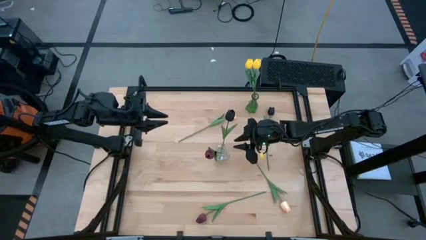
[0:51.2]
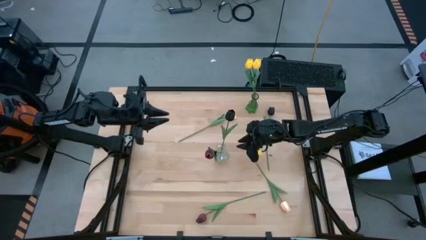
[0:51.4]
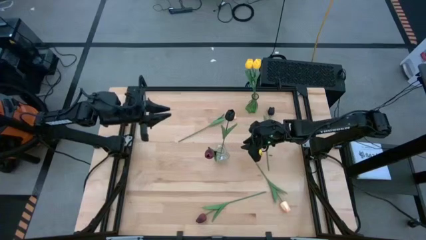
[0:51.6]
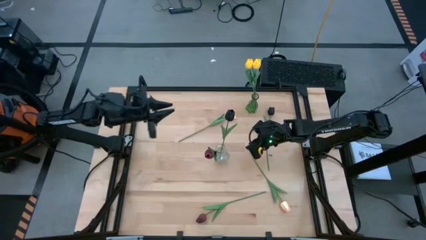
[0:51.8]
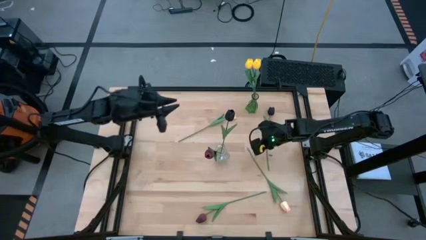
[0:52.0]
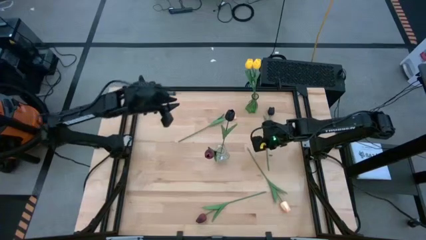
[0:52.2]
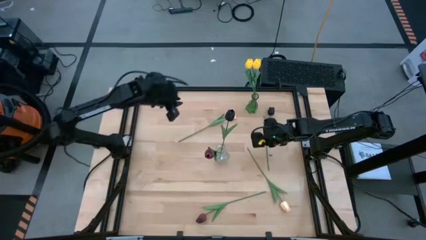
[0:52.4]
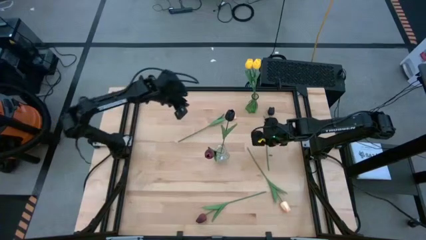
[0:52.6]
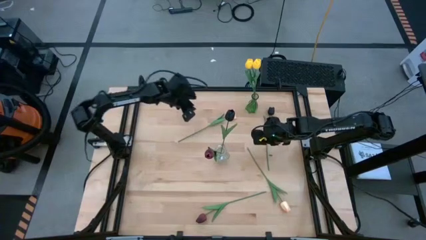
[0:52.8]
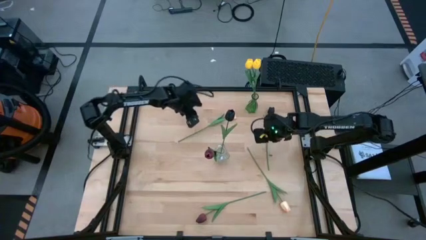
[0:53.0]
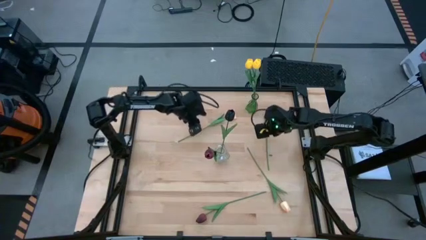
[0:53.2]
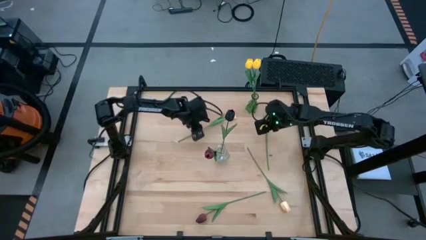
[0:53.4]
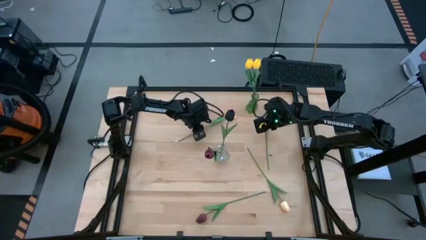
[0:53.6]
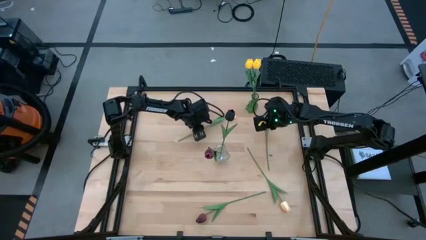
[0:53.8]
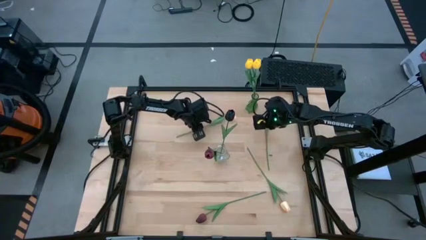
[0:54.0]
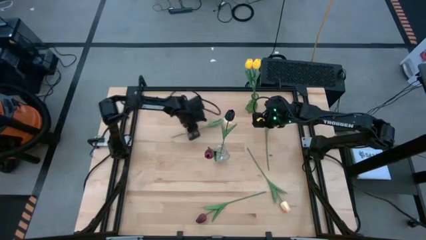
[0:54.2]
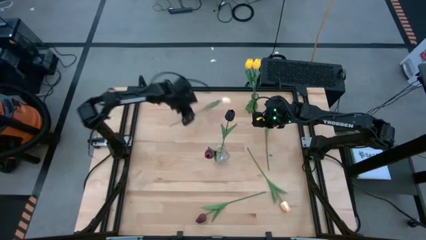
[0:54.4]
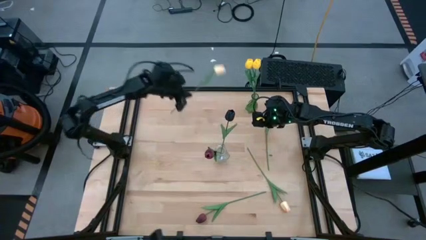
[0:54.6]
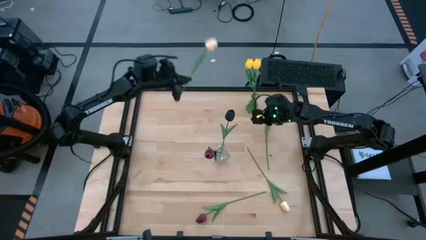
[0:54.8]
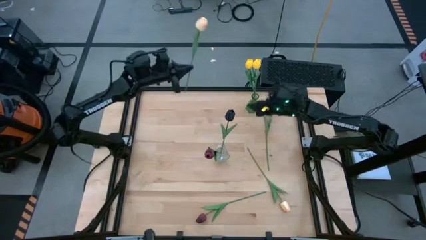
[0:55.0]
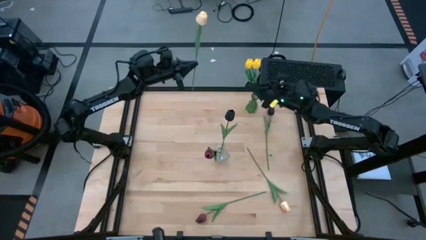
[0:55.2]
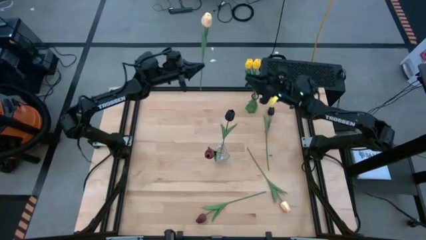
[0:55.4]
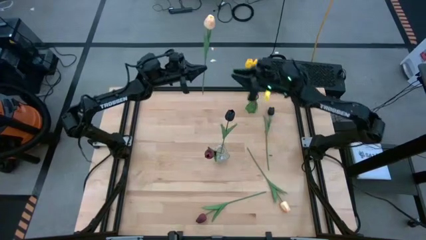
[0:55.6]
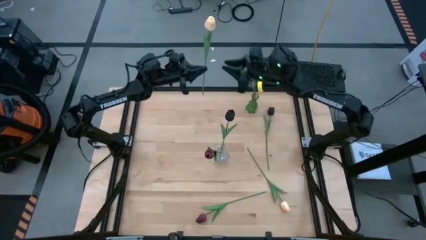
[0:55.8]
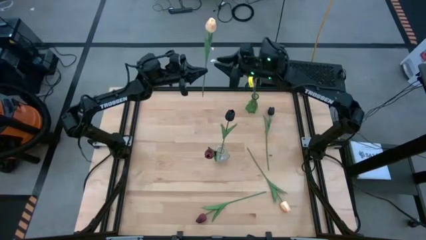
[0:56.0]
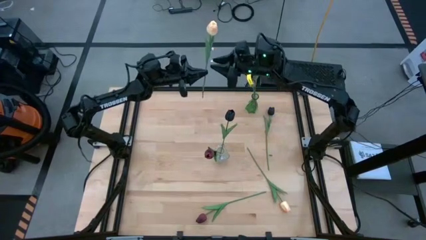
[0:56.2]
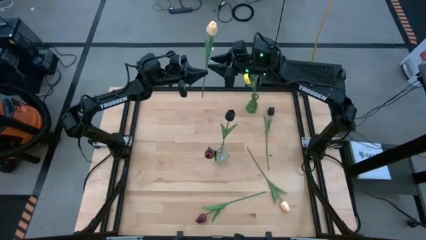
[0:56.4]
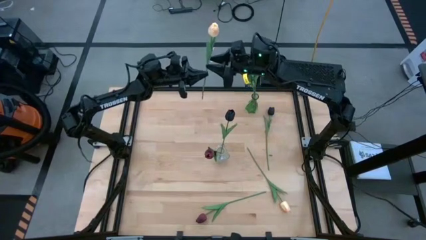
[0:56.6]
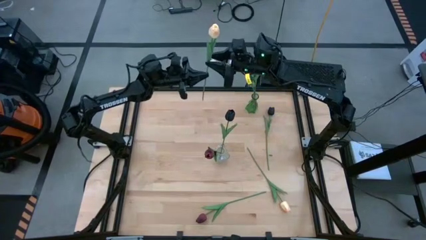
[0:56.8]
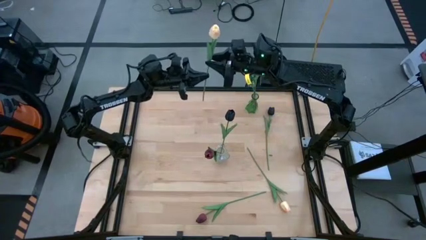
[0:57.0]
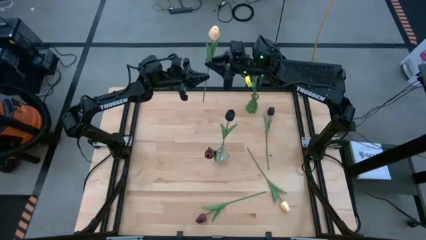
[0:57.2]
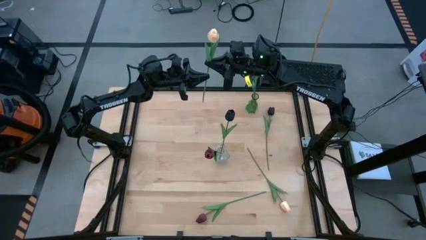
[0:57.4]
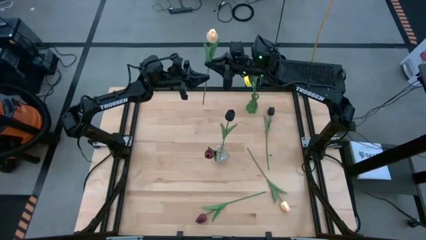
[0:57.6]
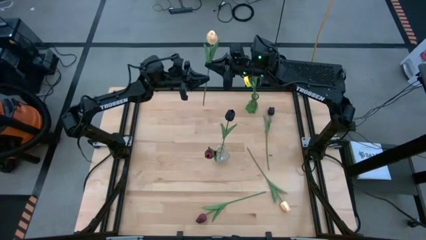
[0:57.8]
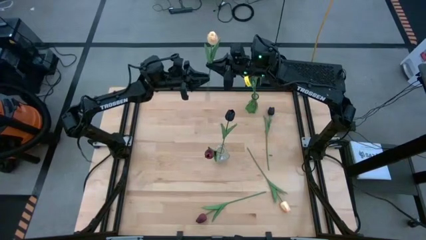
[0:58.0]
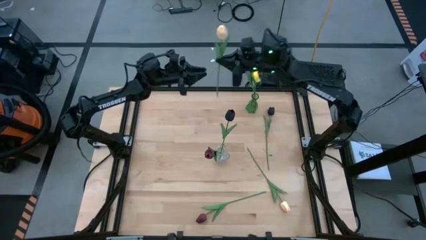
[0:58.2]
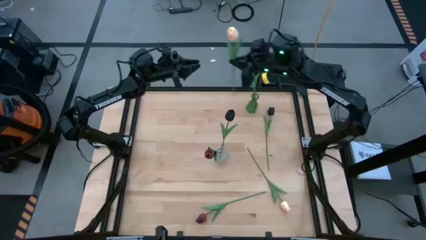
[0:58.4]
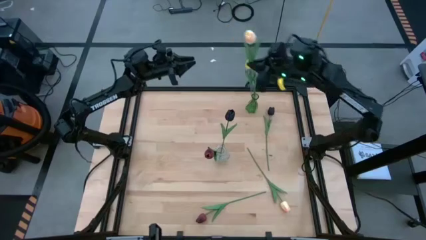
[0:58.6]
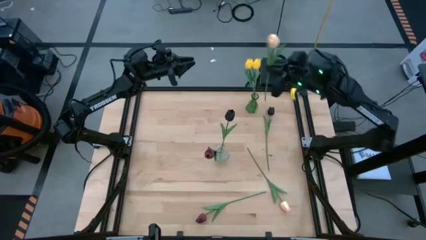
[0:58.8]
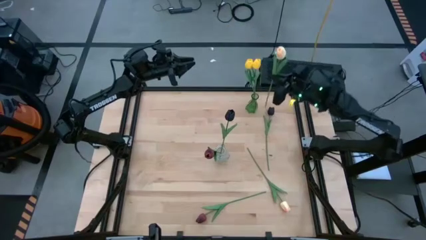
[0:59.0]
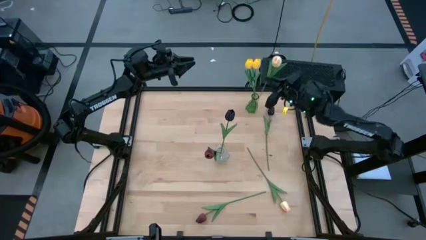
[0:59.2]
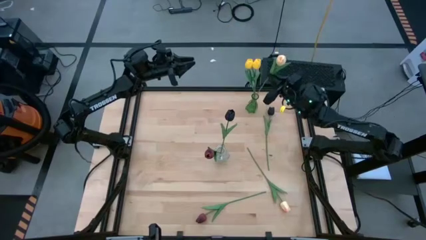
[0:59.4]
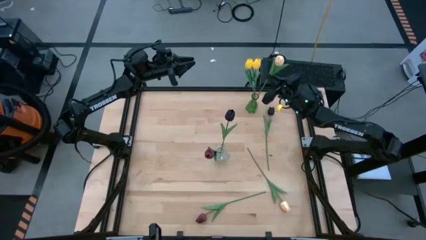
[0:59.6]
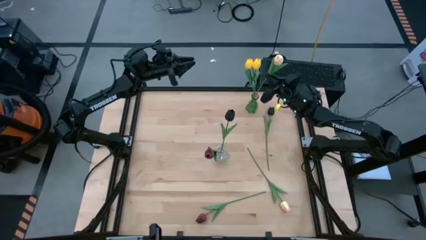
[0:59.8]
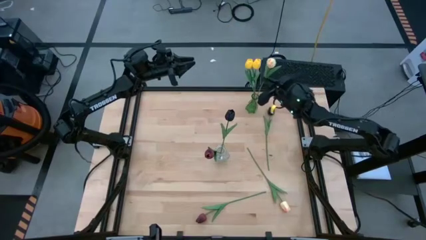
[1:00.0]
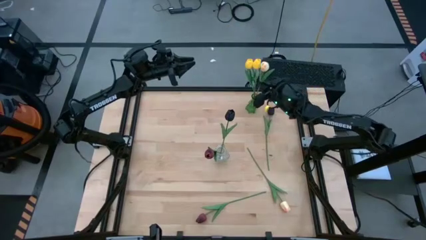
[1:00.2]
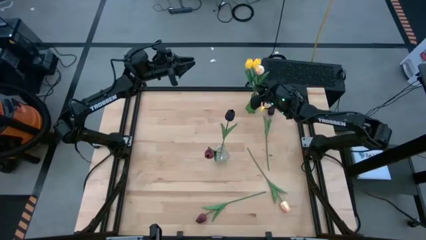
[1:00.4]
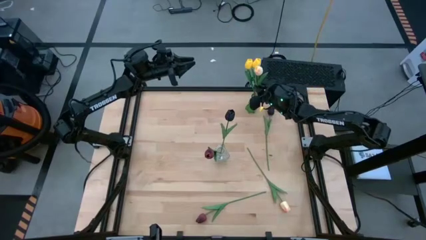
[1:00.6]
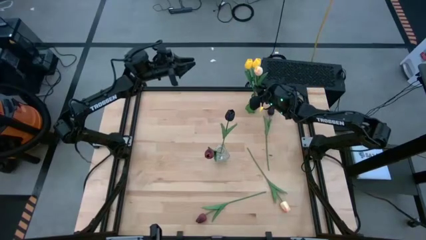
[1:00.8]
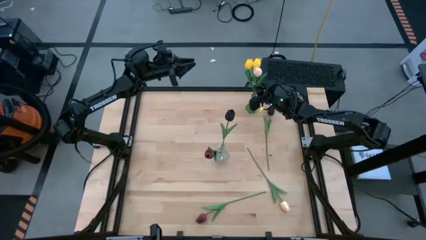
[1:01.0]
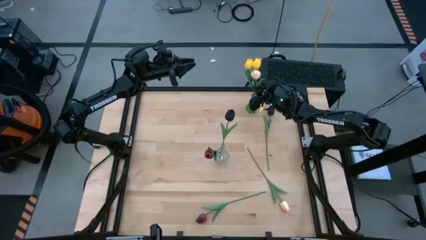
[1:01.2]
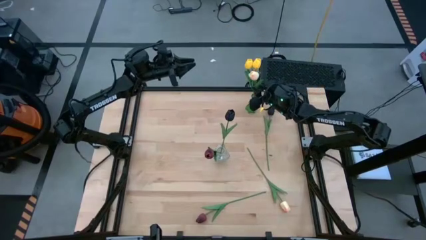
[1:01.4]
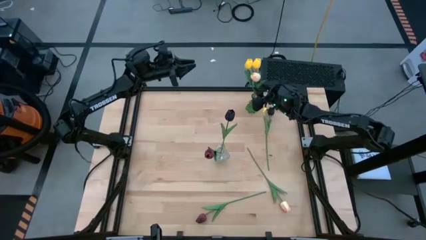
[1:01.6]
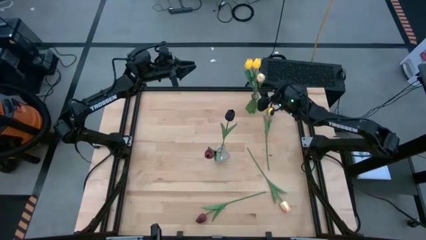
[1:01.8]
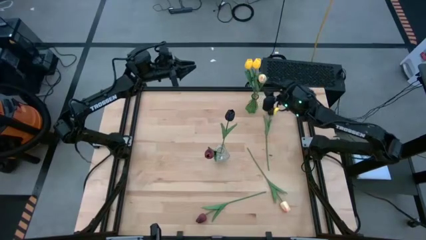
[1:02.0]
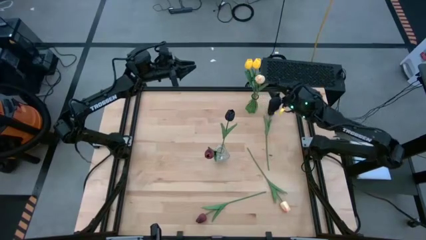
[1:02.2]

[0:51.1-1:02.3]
Task: Sort flowers into vase by color
Put the top light pink tulip into the green vase

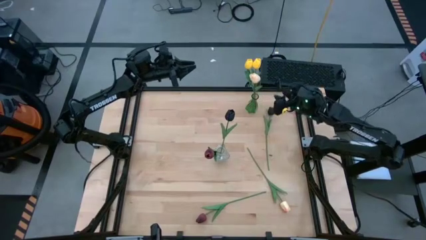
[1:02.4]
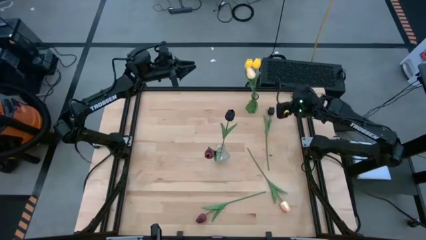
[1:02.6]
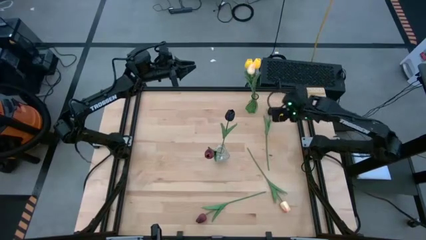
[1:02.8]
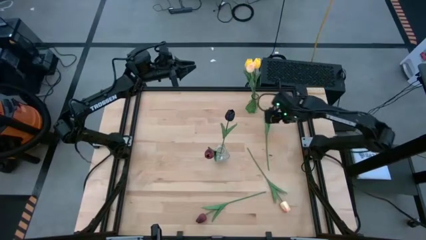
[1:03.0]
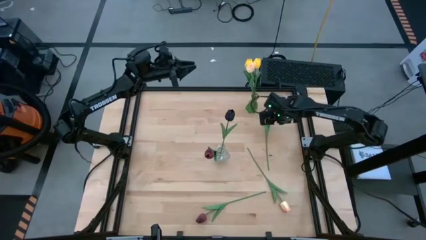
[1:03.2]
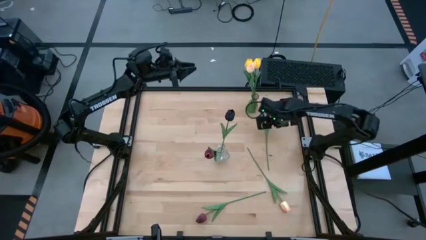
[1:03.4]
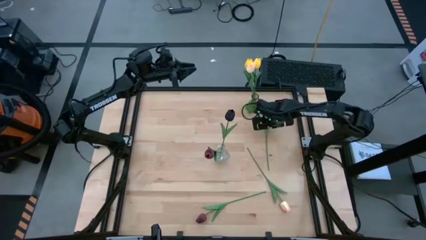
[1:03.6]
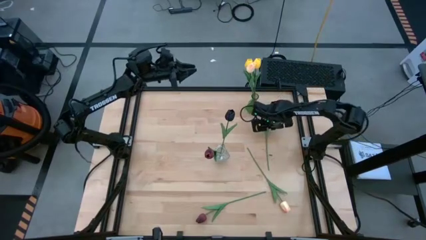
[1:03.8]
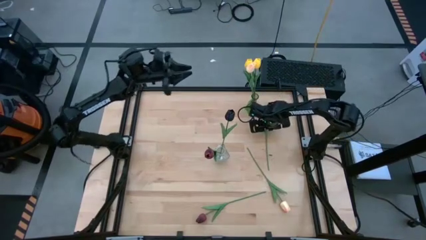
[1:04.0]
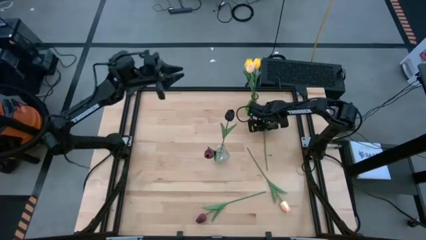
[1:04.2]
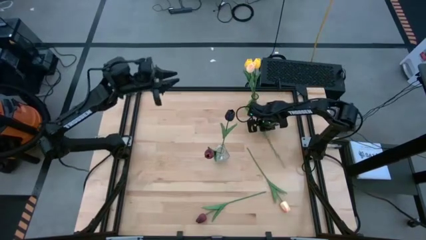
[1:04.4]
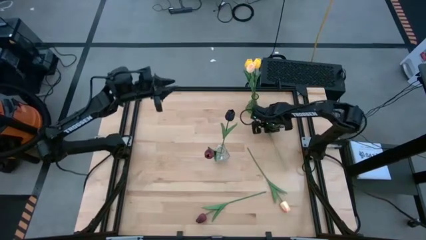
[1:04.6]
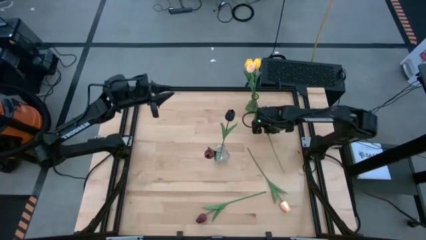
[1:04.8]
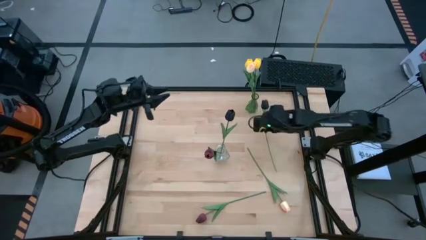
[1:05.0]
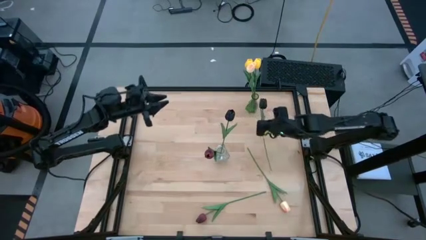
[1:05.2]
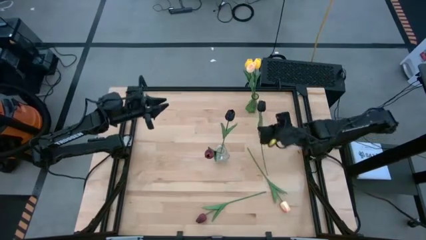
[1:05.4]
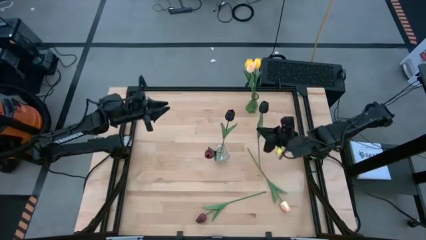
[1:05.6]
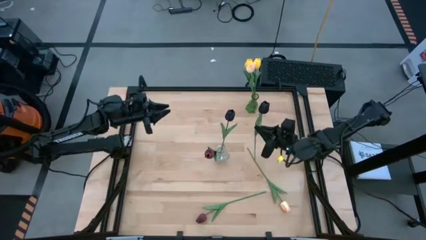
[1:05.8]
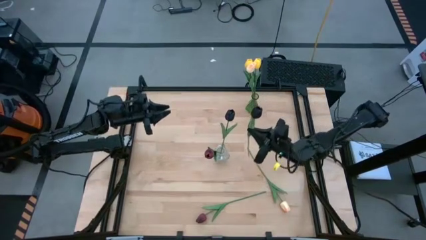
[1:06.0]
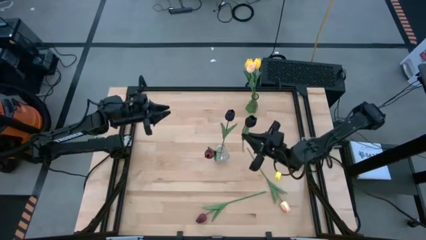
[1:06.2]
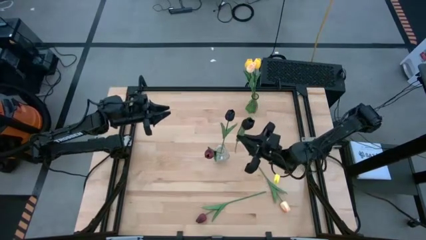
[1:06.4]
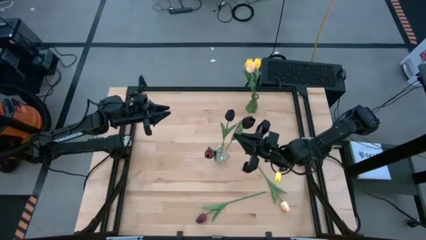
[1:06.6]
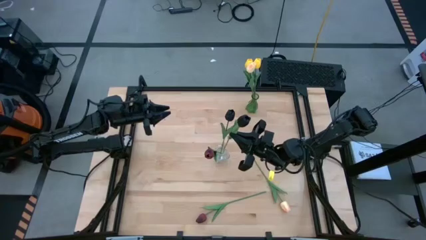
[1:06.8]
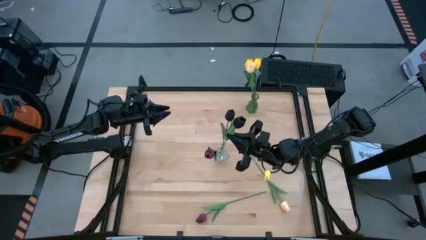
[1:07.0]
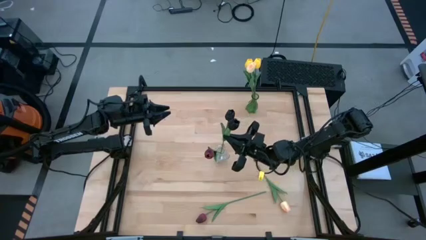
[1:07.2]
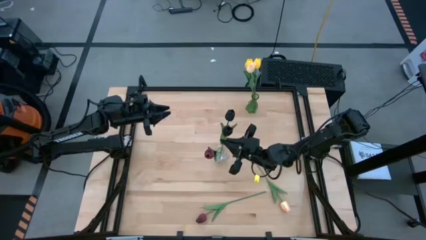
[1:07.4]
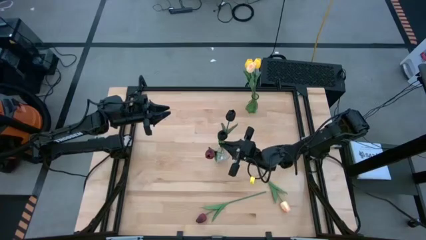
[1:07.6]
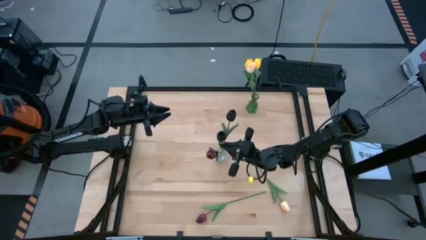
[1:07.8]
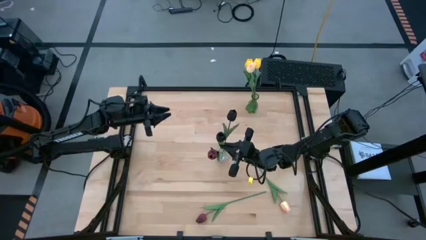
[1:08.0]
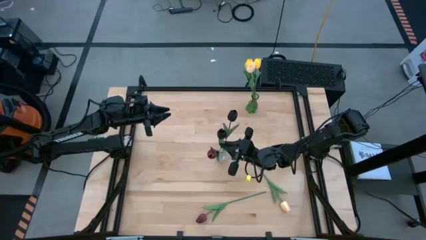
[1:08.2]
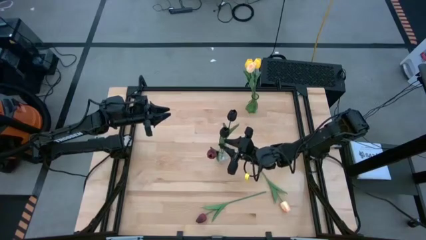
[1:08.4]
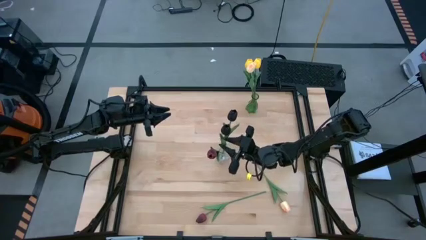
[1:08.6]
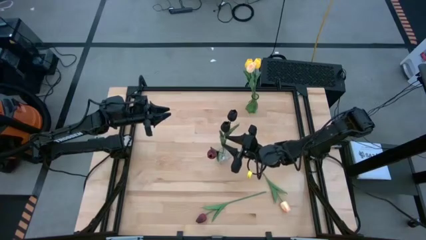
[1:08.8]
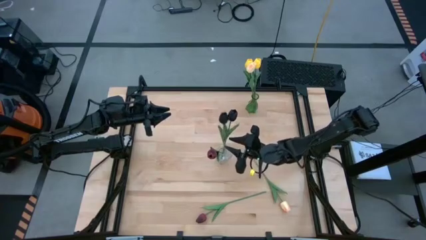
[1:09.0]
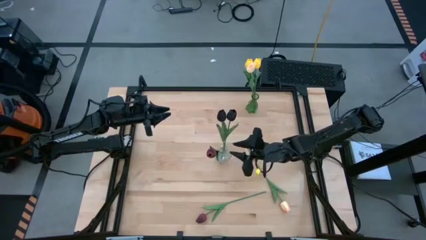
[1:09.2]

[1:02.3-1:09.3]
Put the black tulip into the transparent vase
